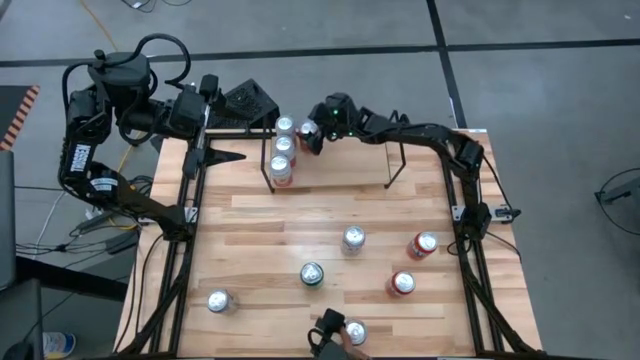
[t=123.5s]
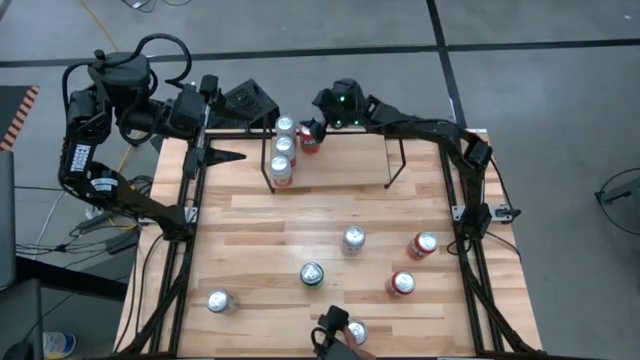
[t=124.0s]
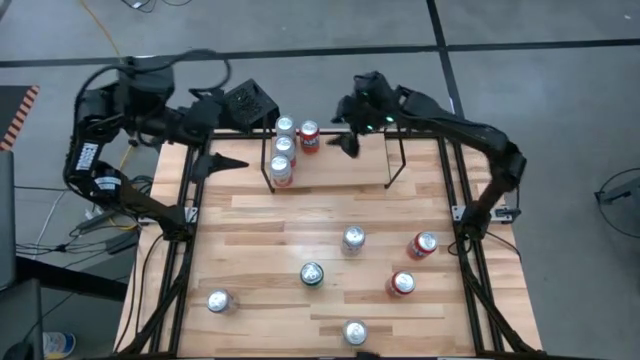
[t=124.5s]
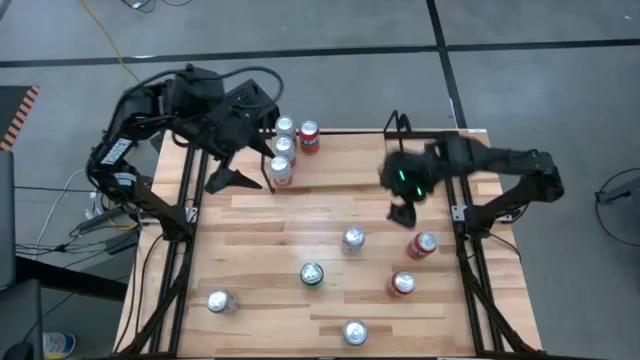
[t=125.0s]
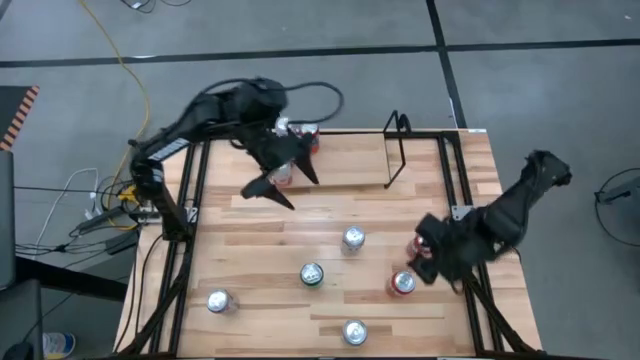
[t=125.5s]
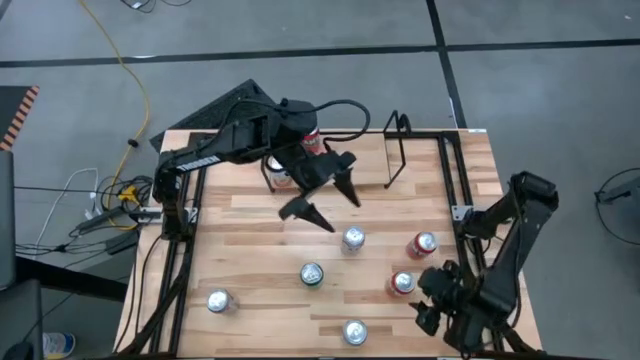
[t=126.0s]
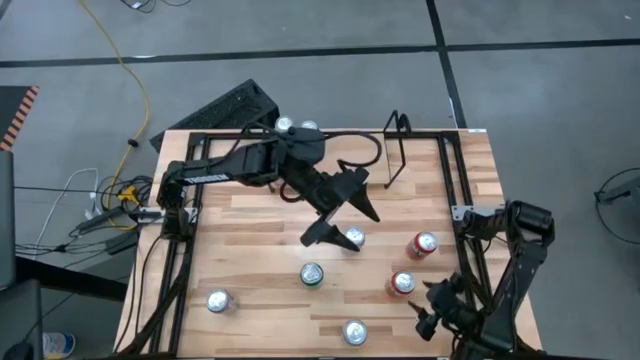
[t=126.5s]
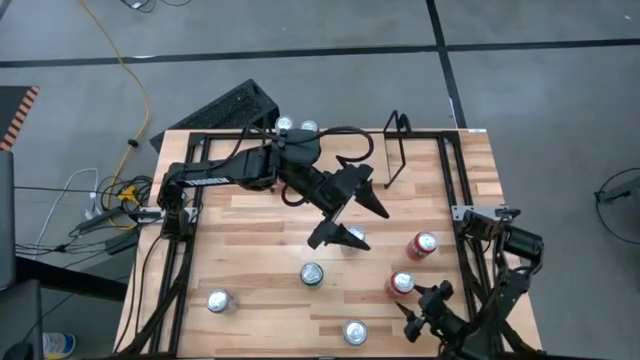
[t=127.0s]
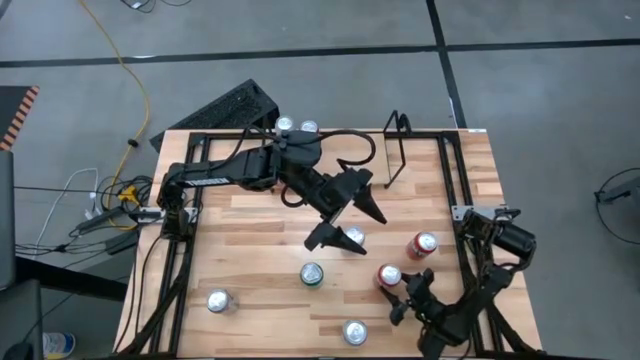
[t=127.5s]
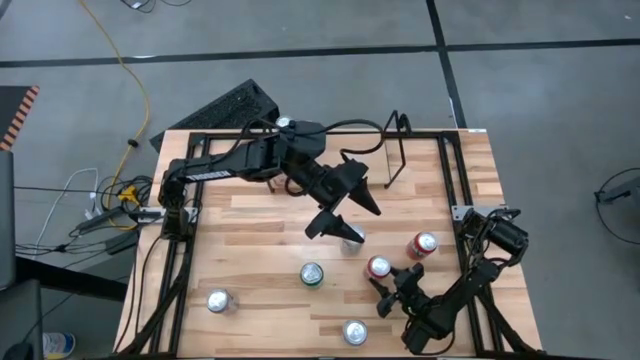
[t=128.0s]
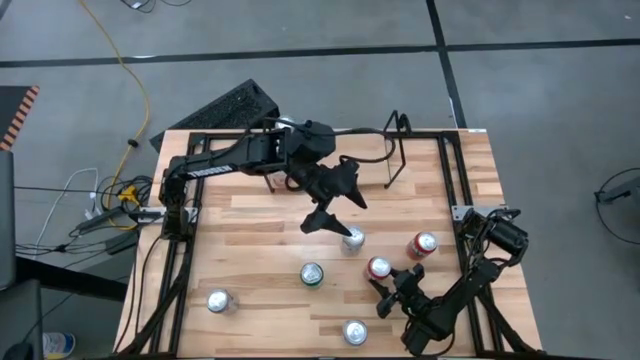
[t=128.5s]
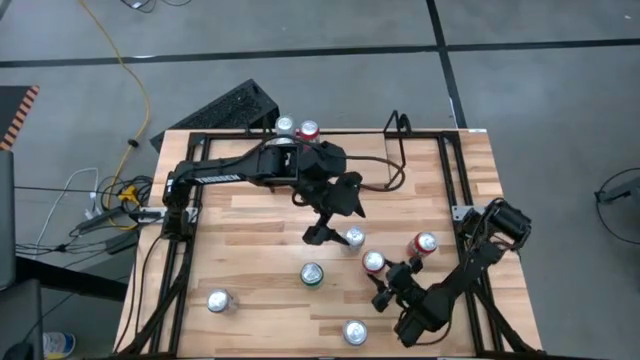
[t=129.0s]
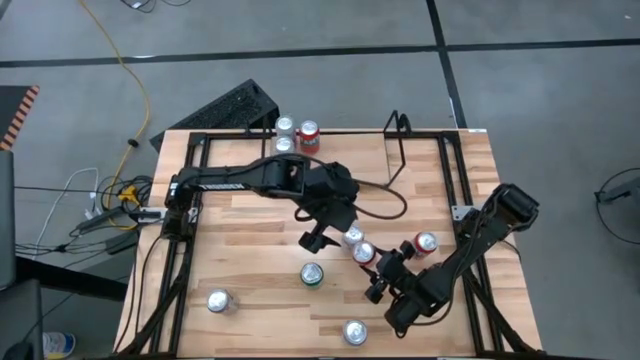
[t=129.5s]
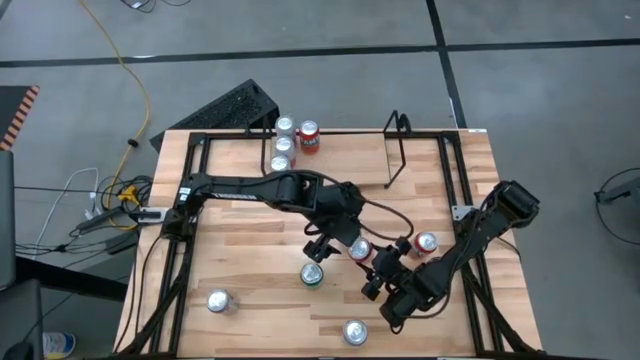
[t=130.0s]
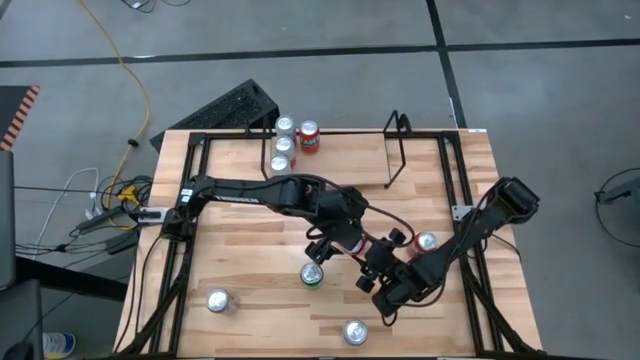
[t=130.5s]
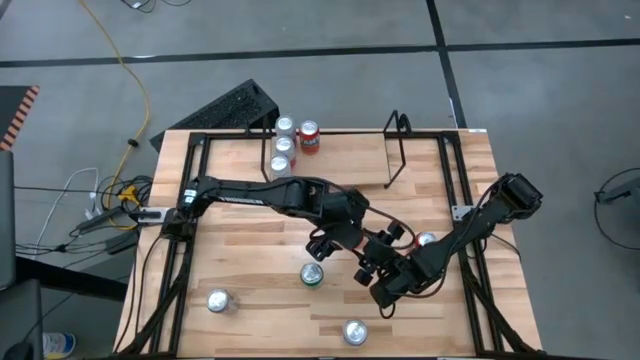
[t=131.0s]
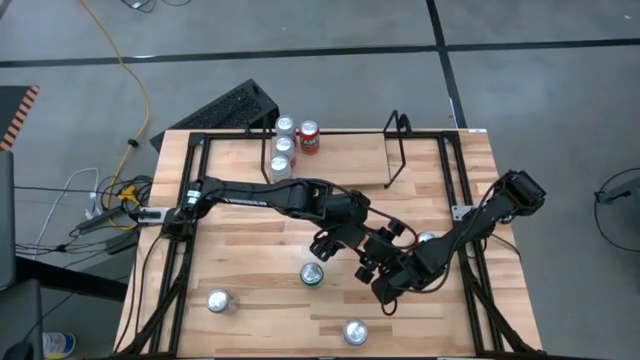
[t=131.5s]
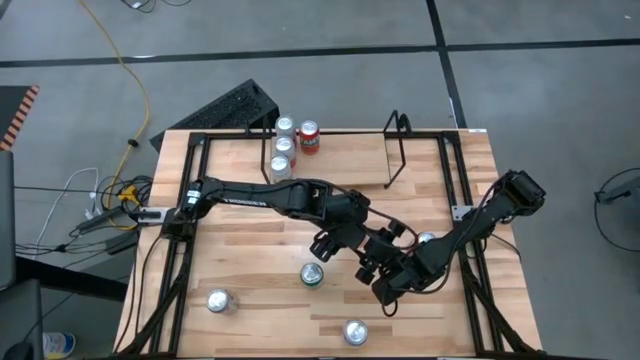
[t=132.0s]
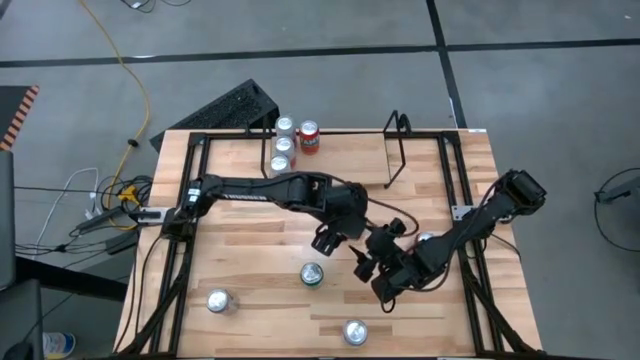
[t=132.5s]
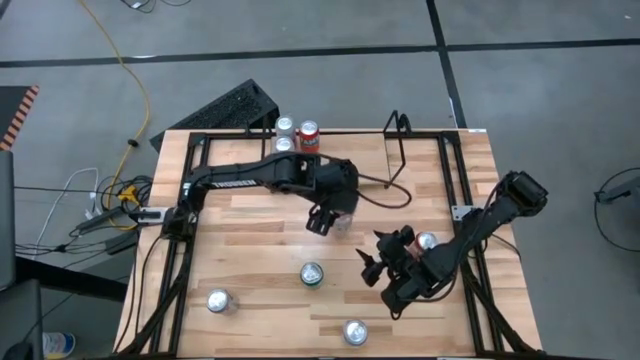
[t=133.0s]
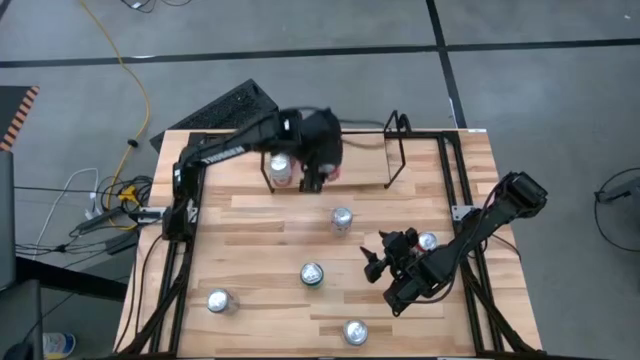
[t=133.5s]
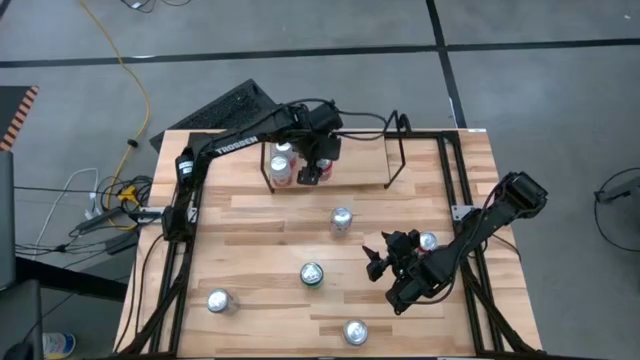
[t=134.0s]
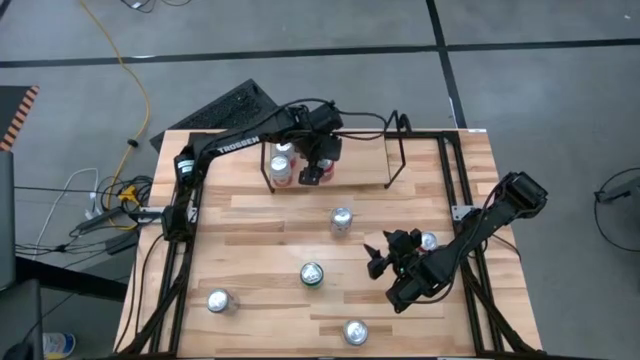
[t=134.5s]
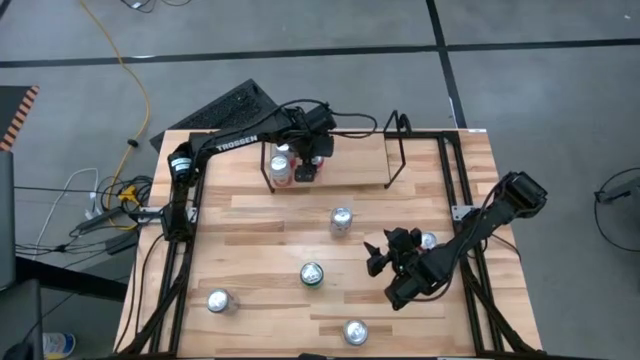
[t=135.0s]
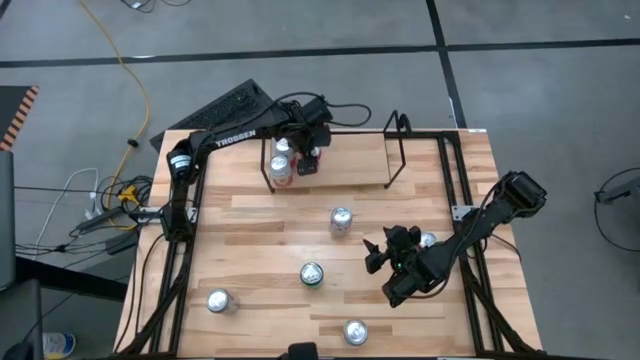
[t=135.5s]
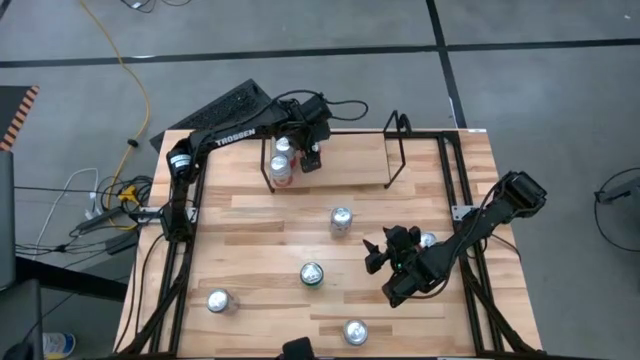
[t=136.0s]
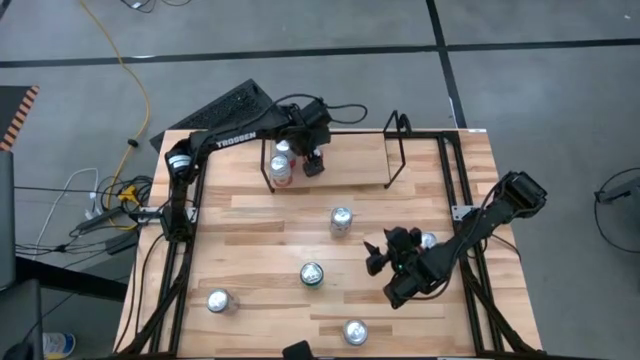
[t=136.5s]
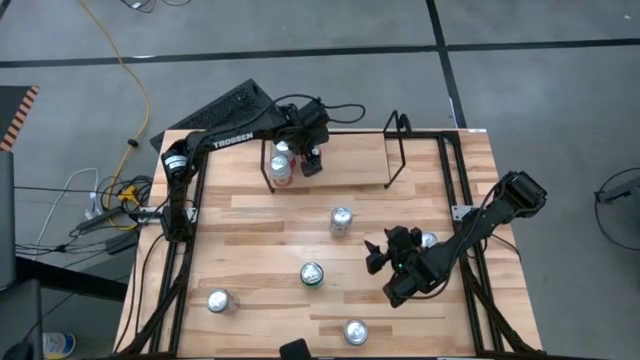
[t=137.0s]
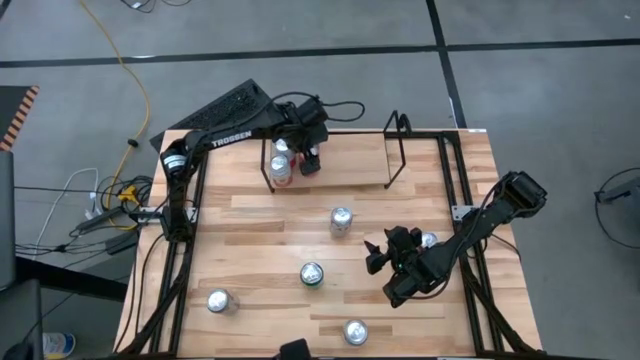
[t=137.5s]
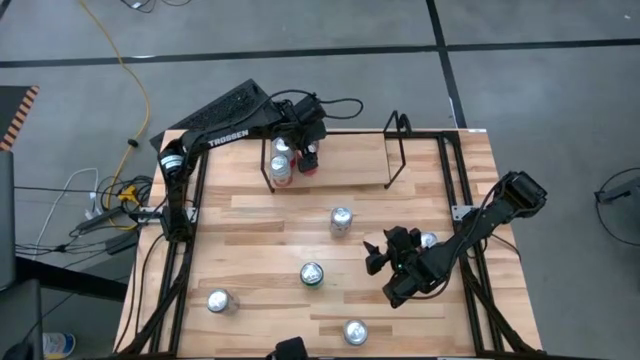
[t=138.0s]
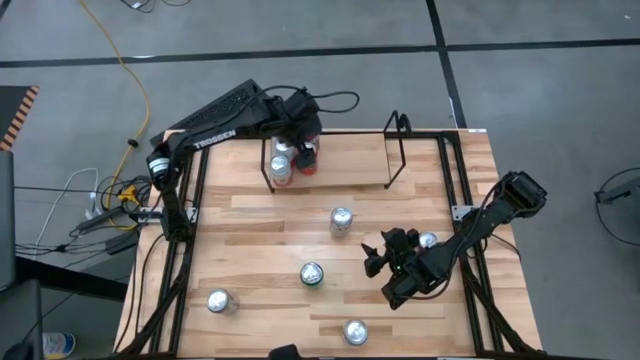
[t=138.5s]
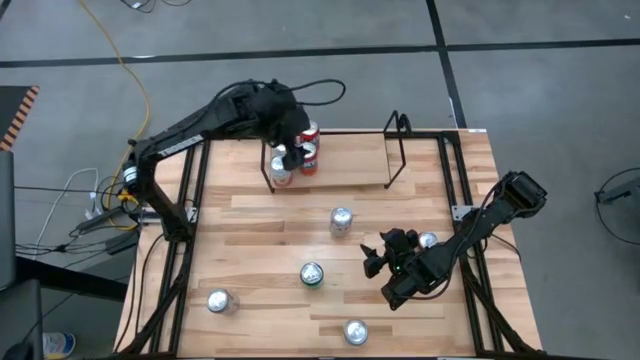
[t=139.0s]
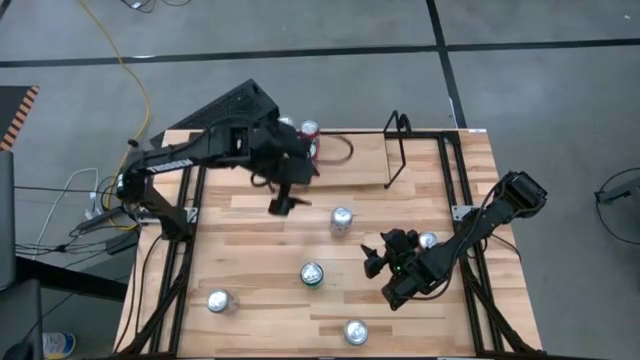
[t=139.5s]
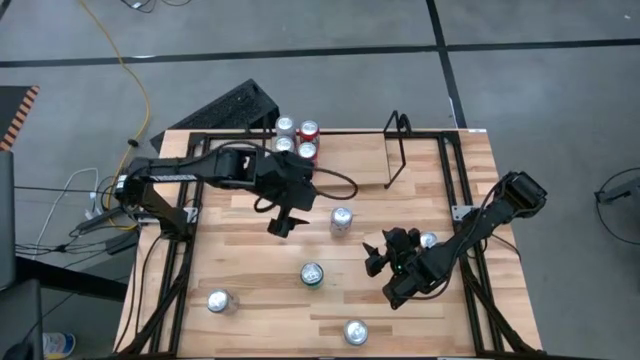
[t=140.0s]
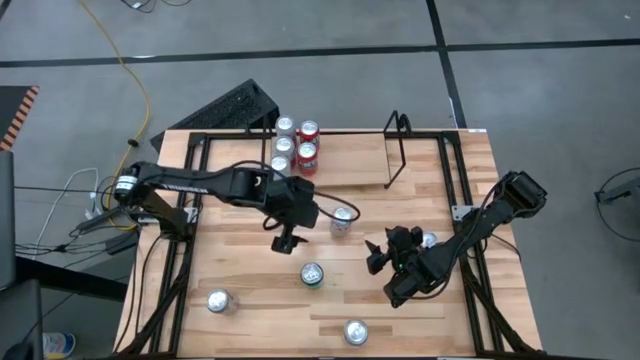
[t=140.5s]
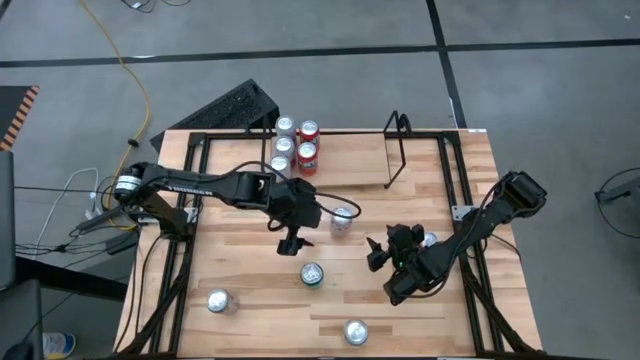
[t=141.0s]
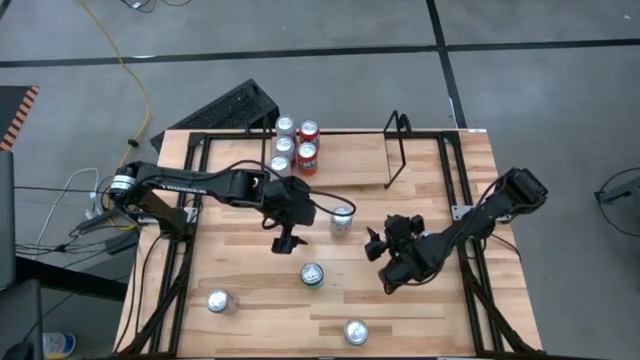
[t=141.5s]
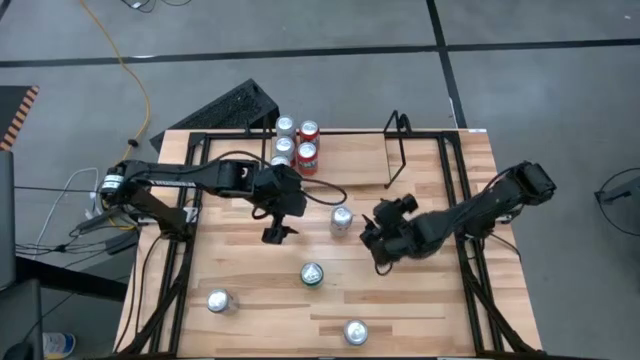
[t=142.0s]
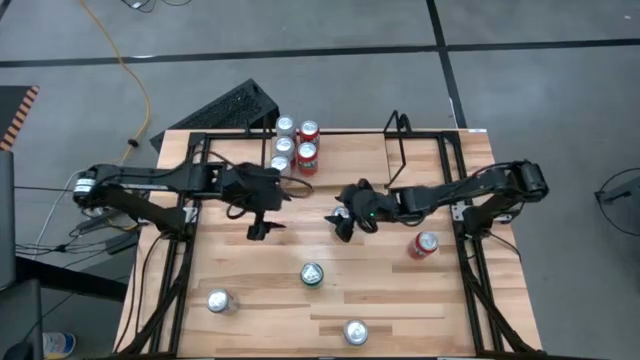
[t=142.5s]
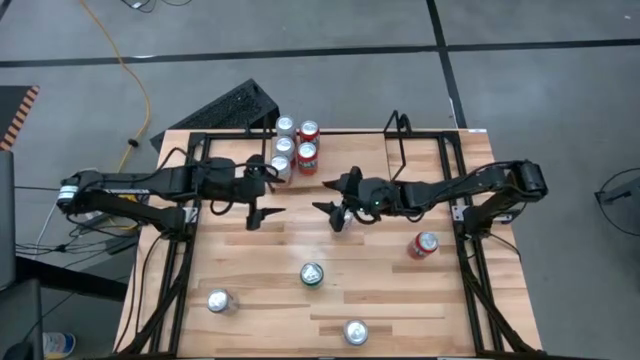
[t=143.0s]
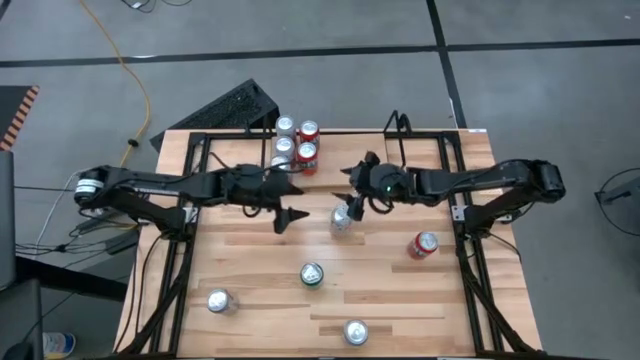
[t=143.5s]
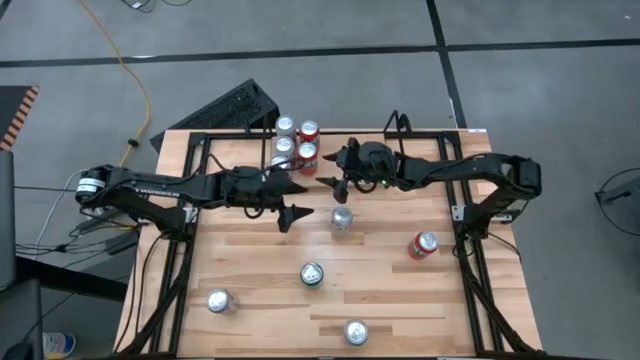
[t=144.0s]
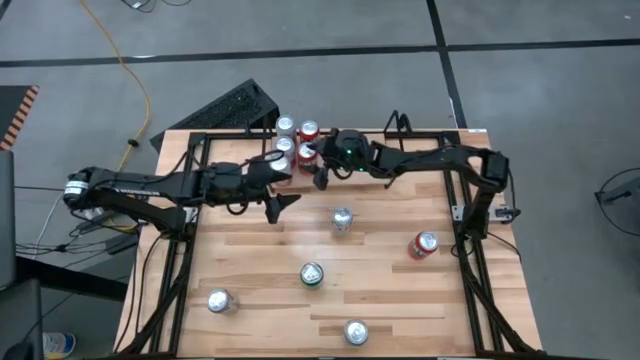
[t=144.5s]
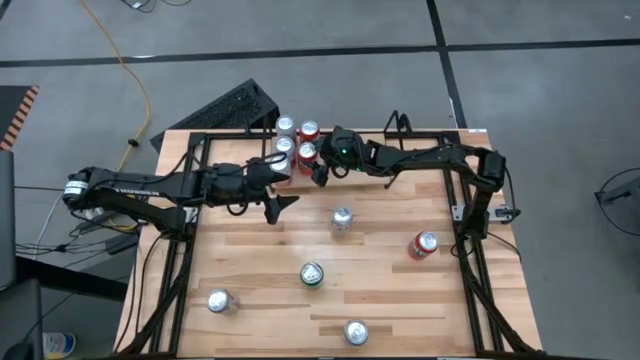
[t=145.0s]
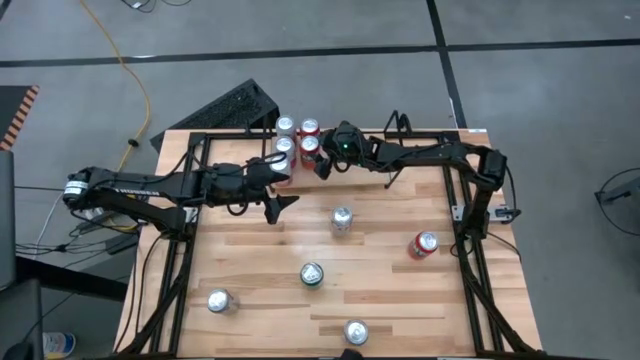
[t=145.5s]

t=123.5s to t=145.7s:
Task: Place canned beverage on shelf
Put the bottom red soda can on the shelf aligned with the other red soda can
